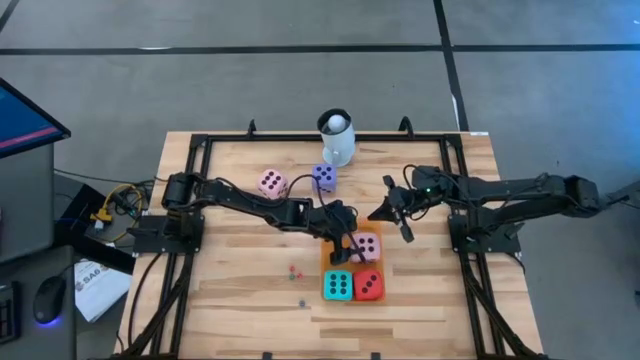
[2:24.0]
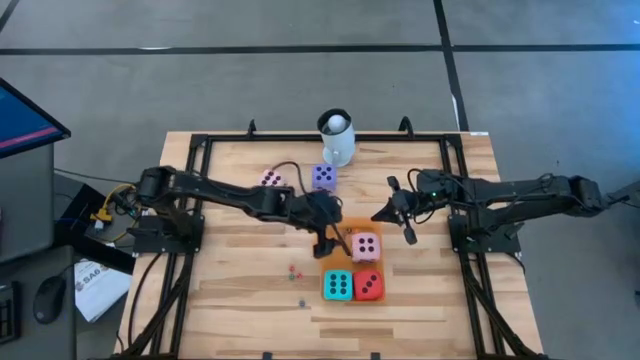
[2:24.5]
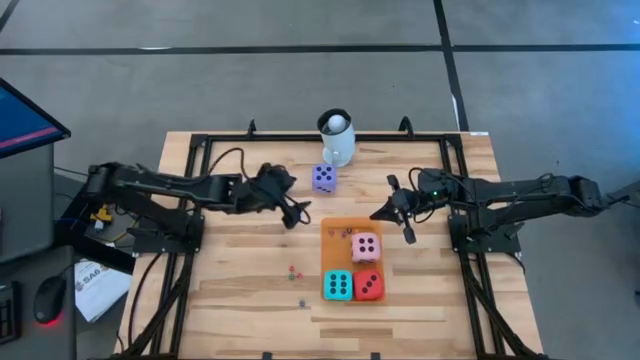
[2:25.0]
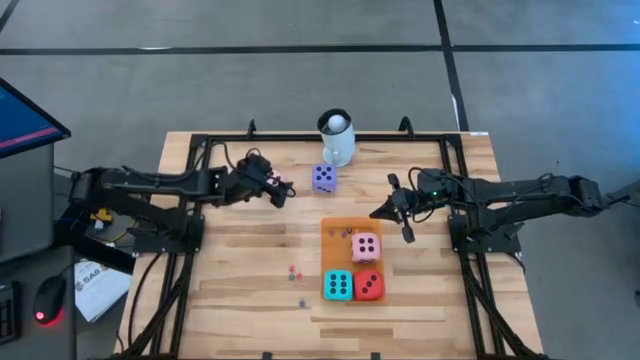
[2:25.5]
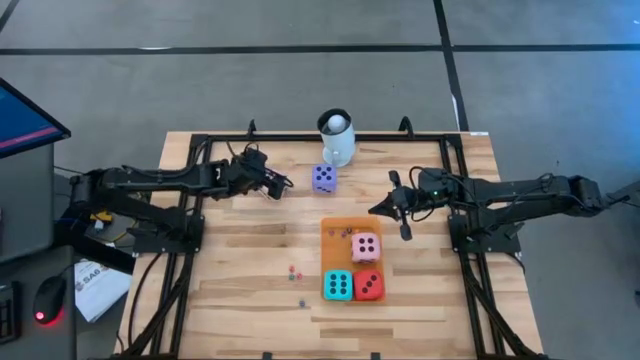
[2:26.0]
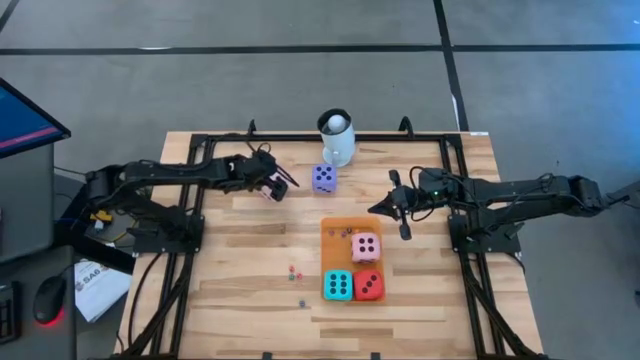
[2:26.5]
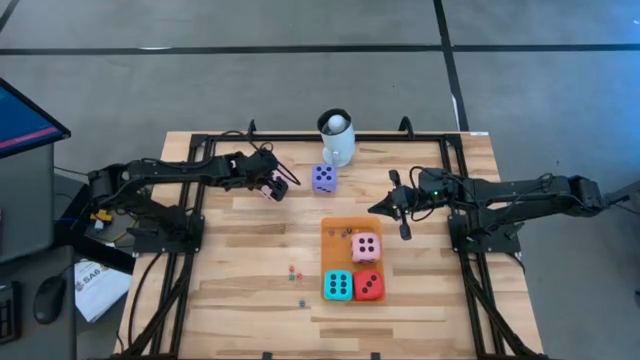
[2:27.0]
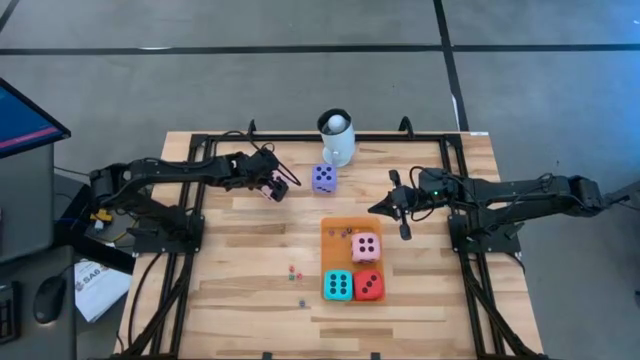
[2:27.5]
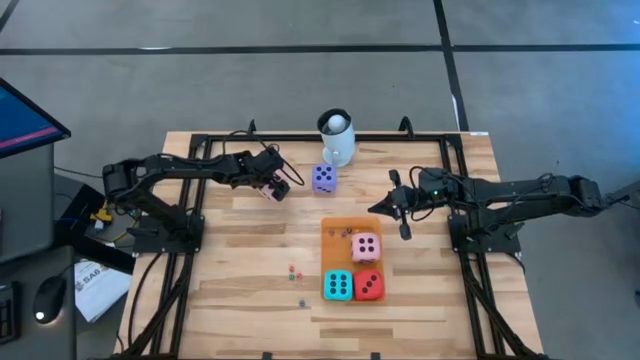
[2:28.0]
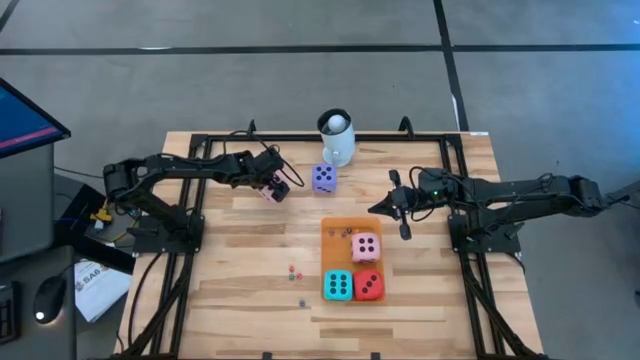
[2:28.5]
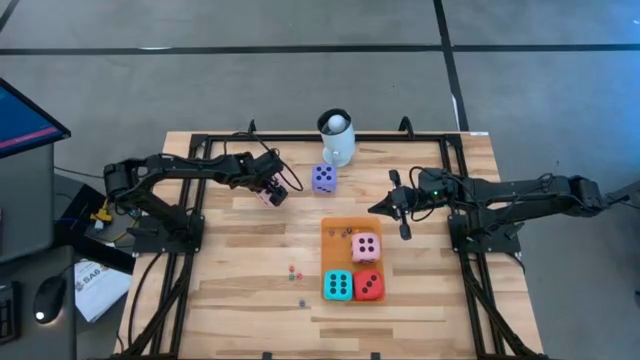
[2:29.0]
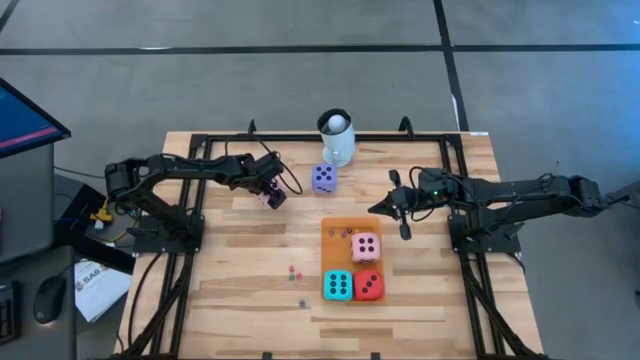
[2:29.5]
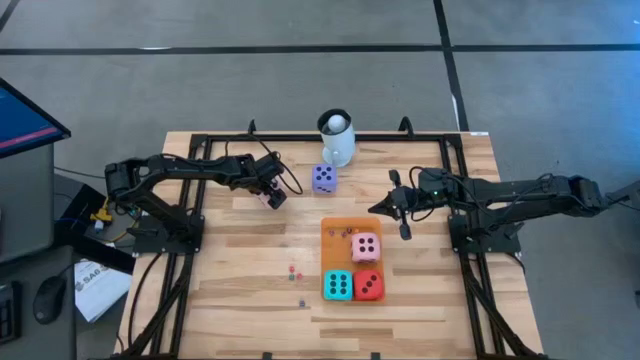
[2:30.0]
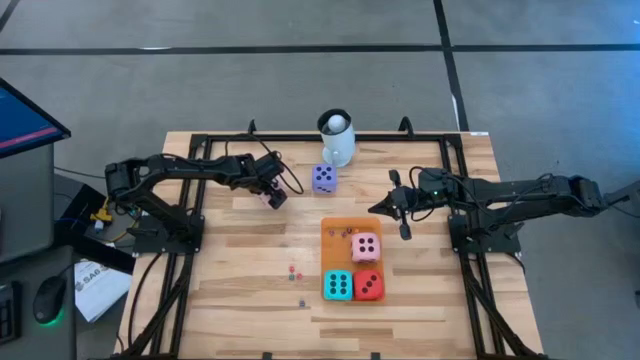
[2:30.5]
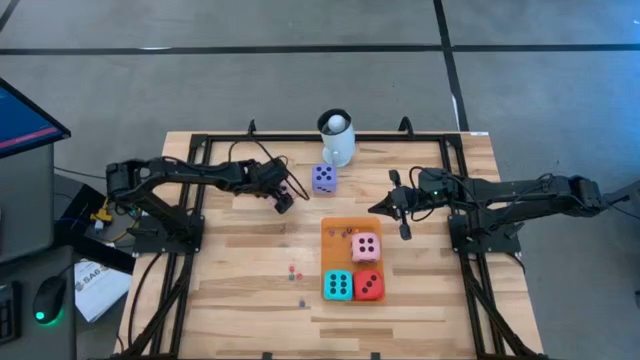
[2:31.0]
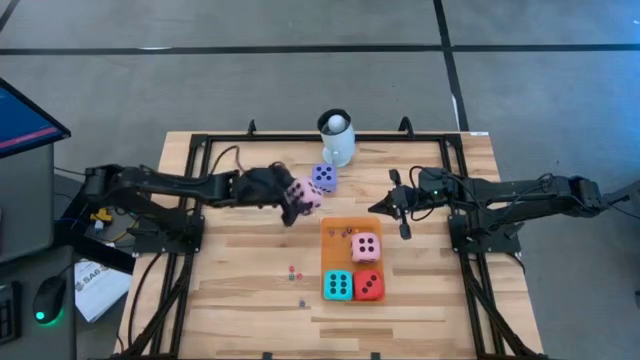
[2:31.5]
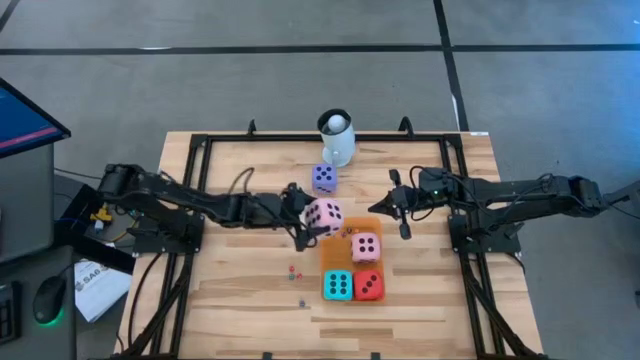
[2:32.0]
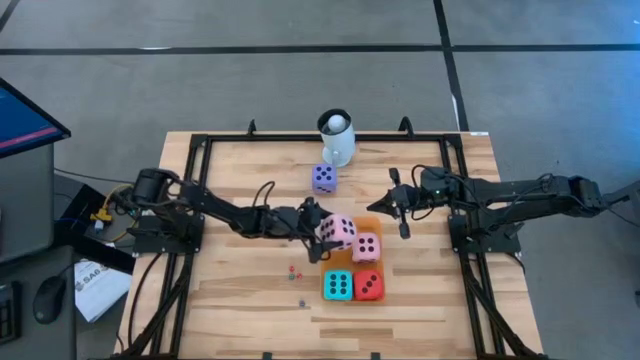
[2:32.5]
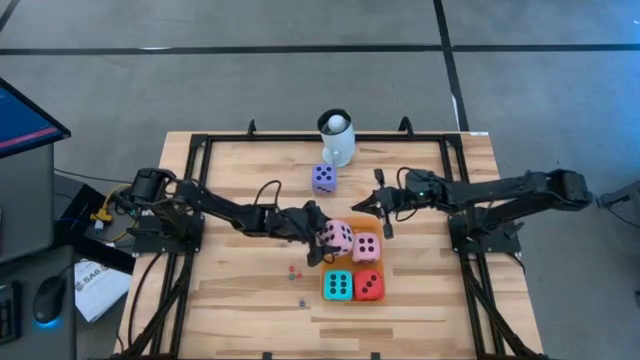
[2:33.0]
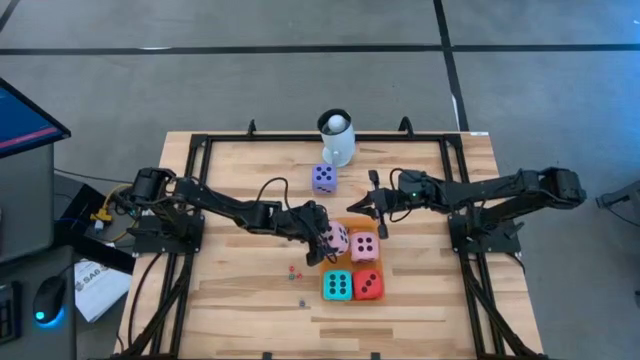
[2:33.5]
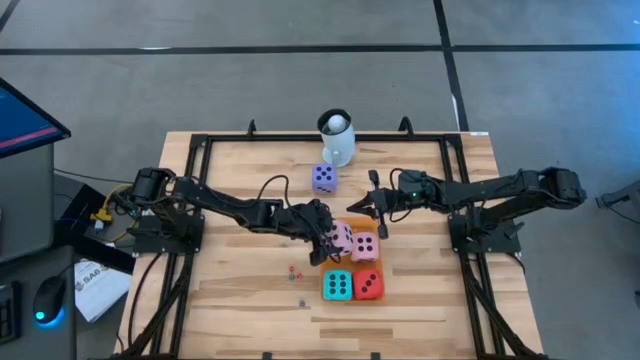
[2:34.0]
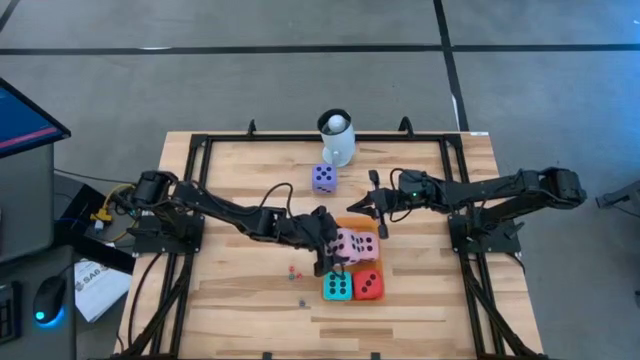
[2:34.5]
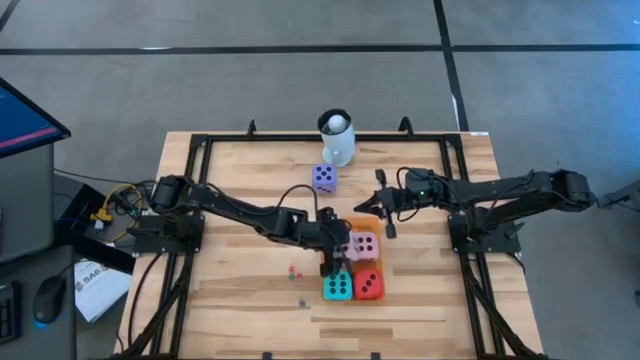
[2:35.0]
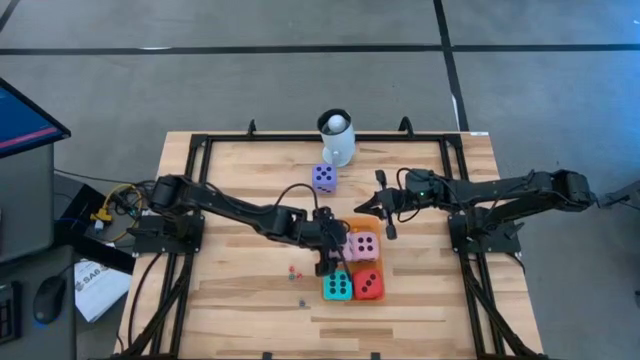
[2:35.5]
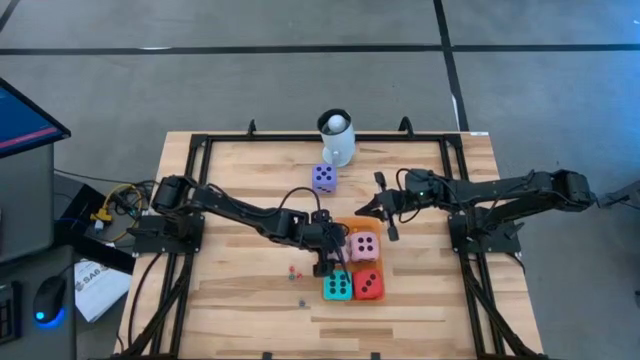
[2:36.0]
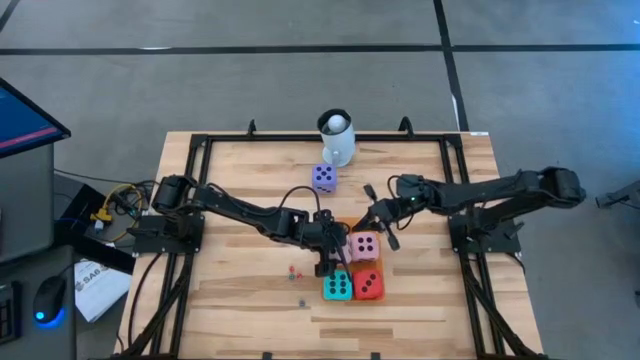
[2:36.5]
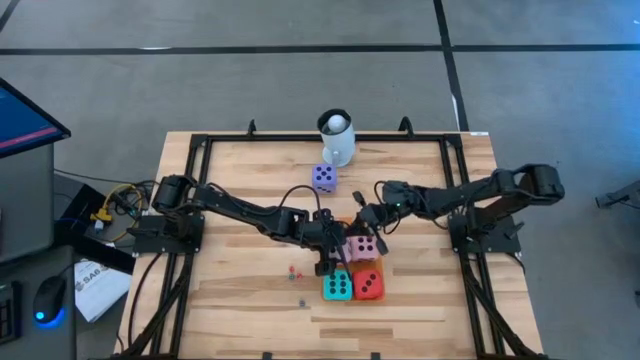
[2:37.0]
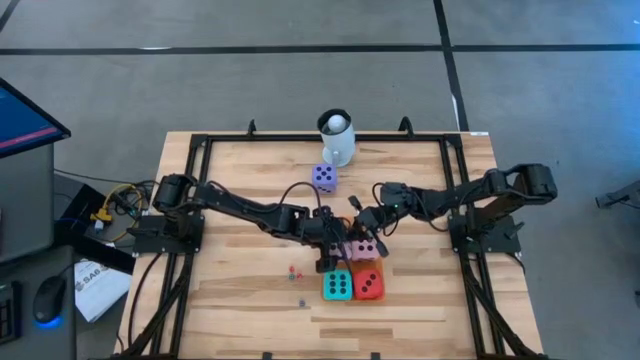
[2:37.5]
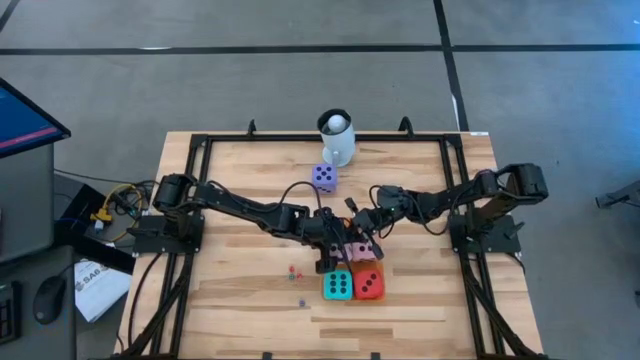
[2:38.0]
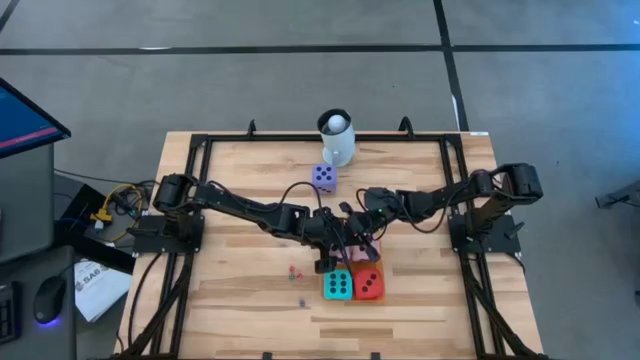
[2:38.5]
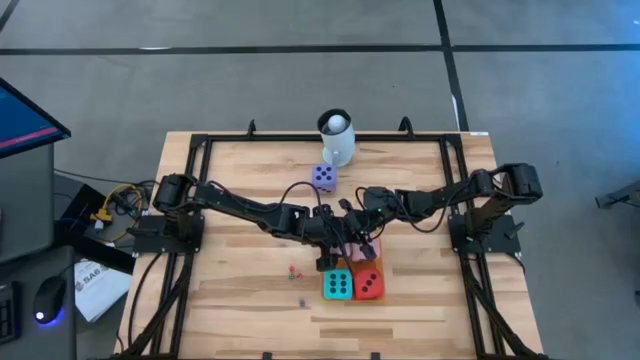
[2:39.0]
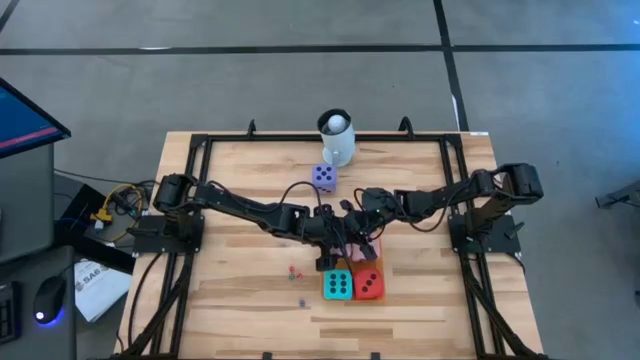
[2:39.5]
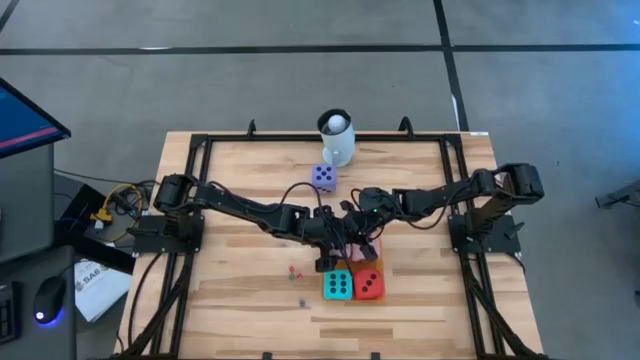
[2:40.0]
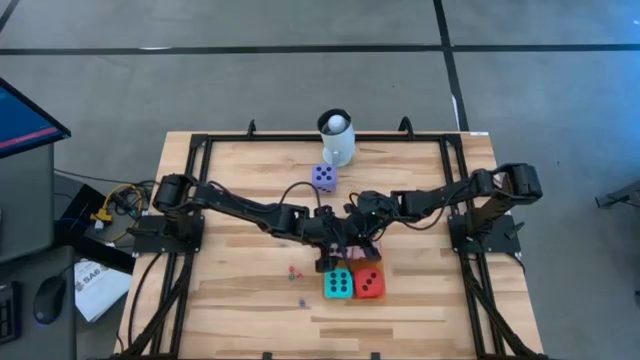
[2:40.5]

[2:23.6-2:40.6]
Task: Pick & Place Dice
Put the large pink dice into the orange bin

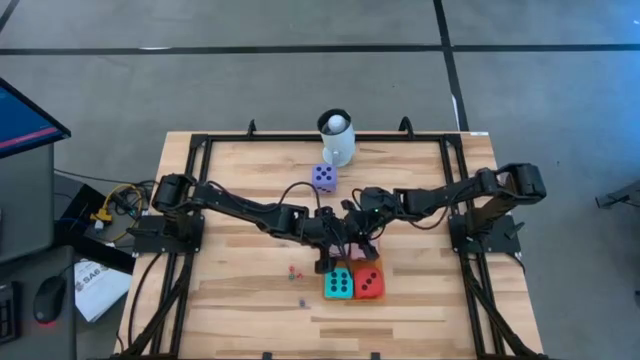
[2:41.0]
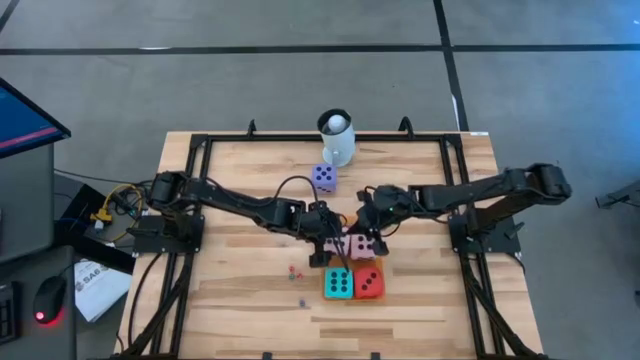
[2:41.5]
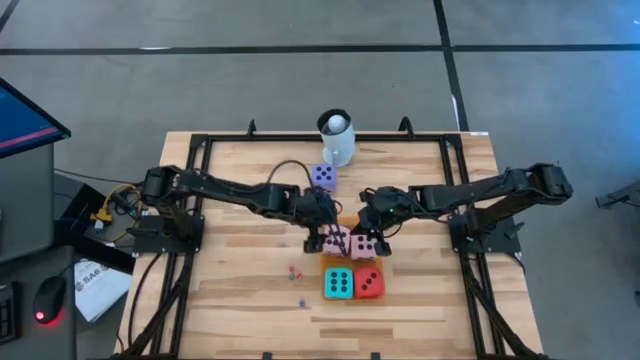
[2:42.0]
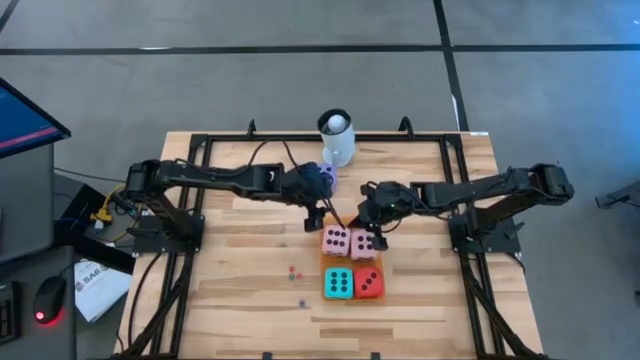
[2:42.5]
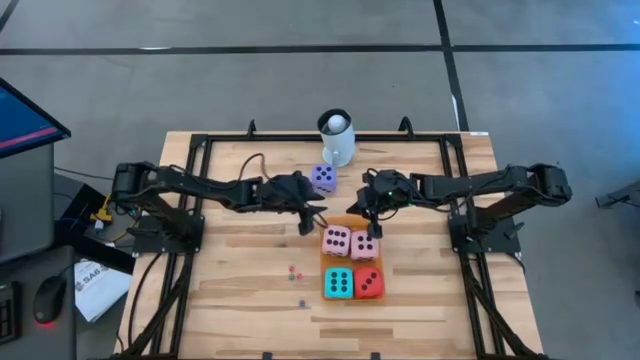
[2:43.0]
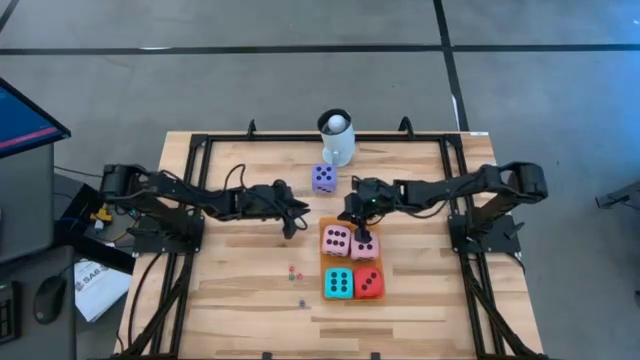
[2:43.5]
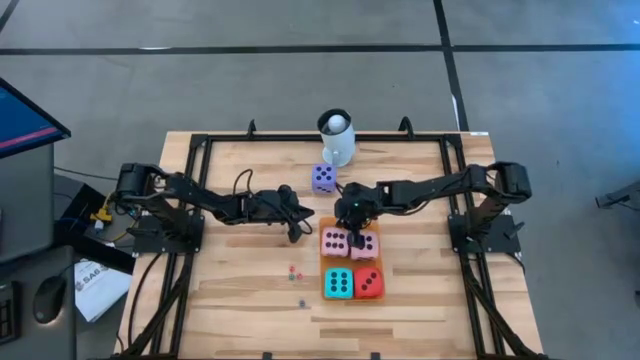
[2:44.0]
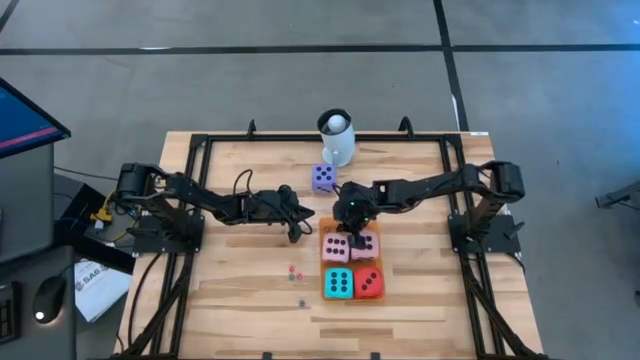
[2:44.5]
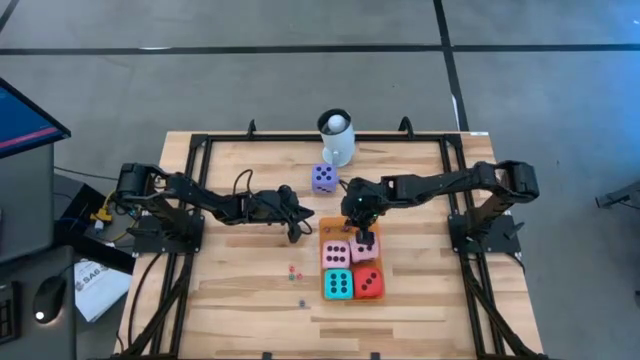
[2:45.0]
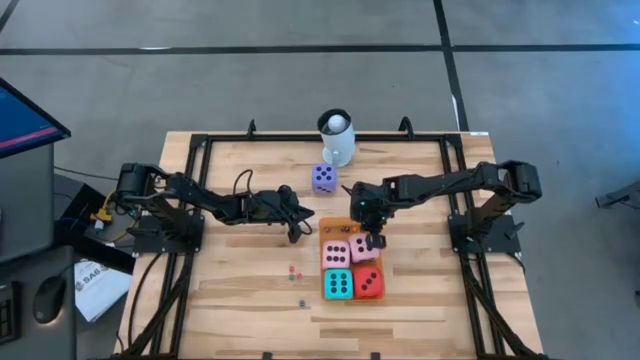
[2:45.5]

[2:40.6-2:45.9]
Adjust the pink dice in the orange bin
